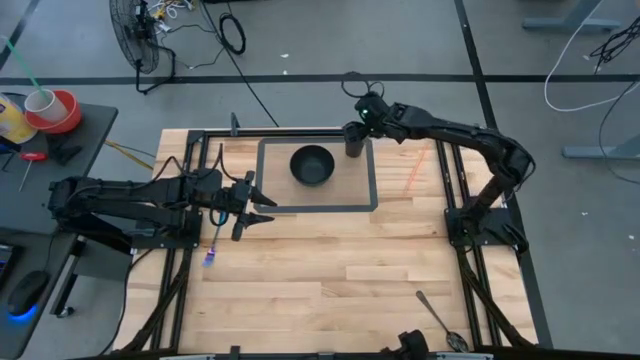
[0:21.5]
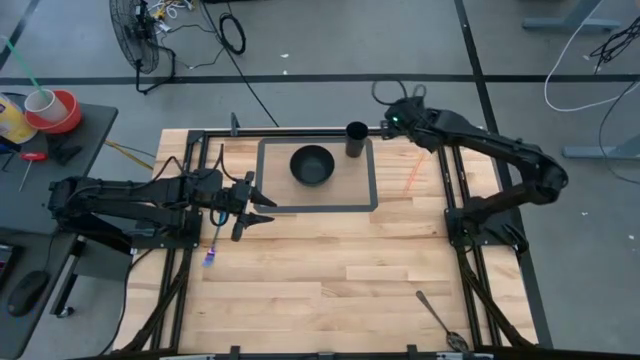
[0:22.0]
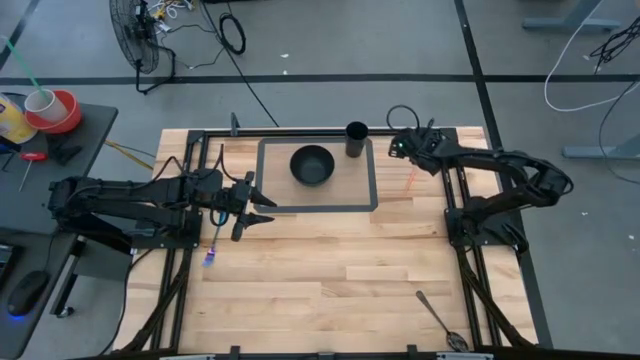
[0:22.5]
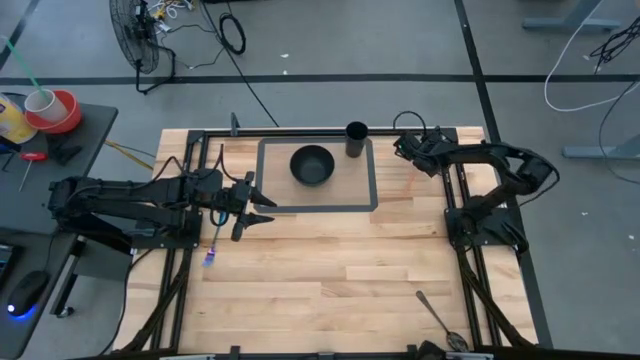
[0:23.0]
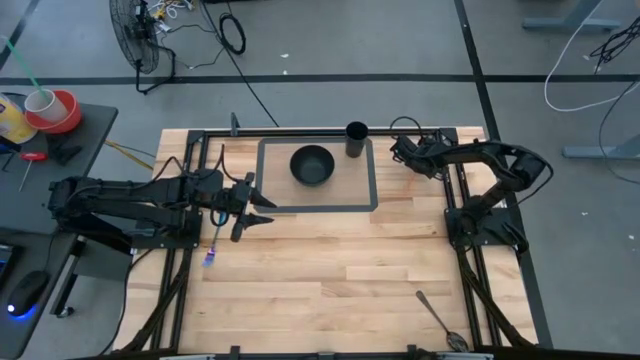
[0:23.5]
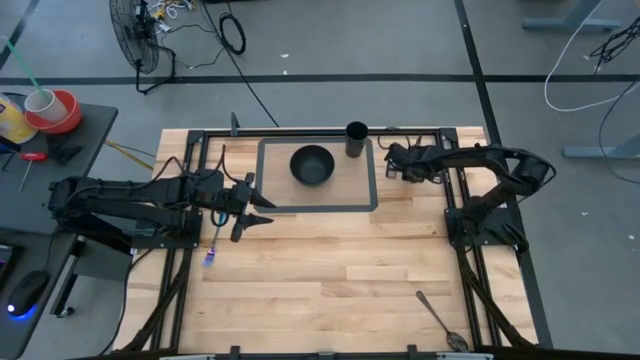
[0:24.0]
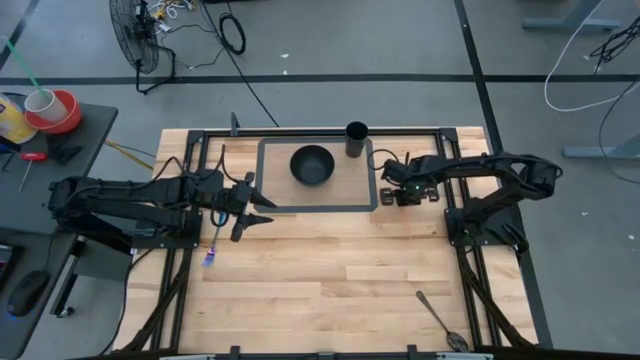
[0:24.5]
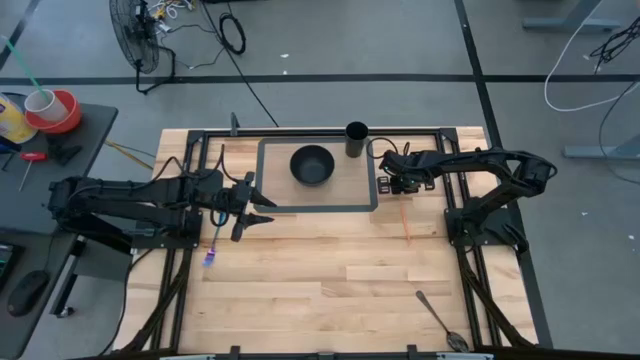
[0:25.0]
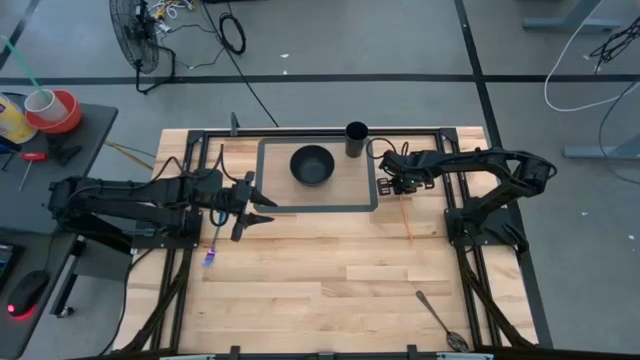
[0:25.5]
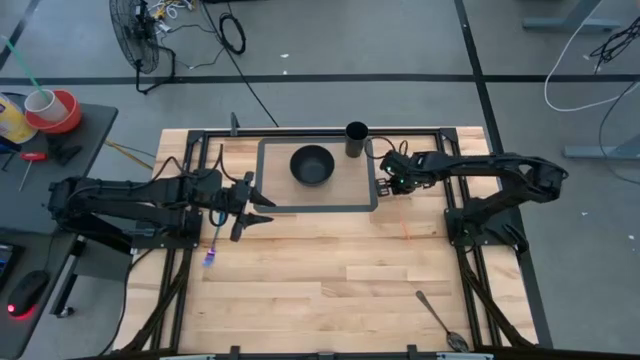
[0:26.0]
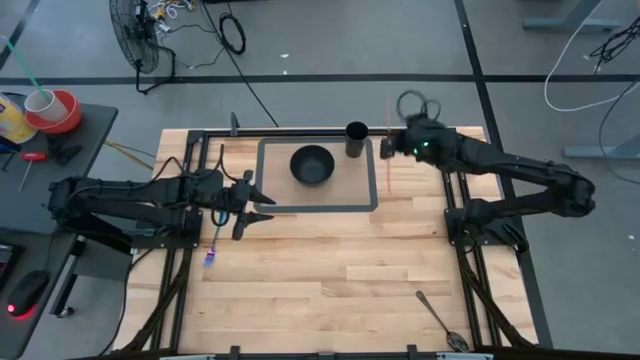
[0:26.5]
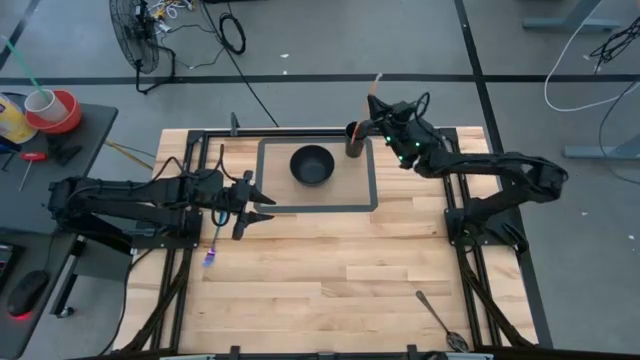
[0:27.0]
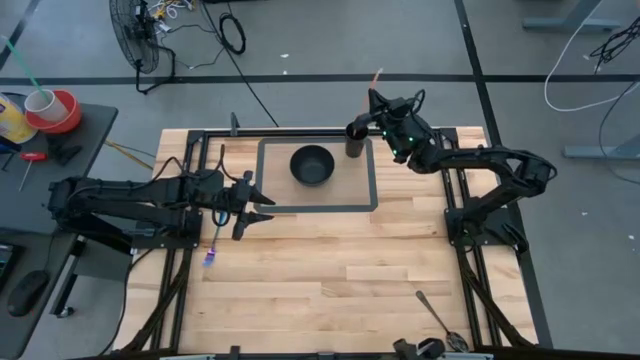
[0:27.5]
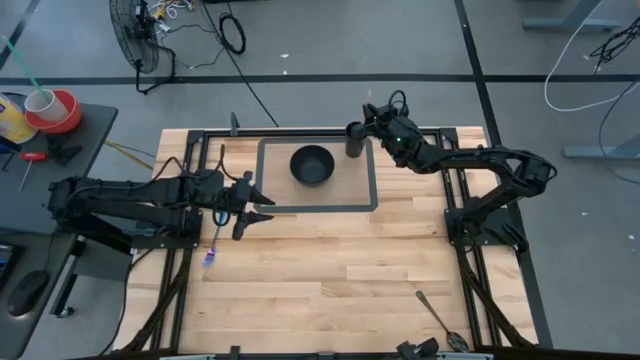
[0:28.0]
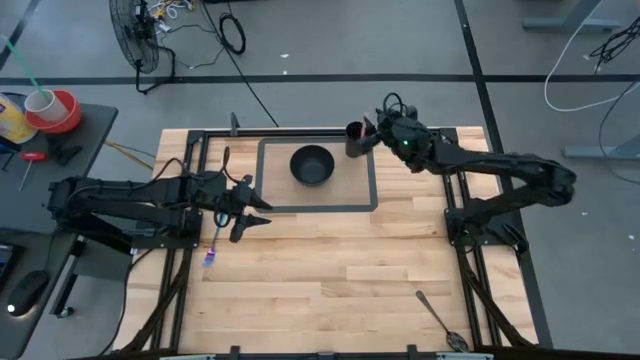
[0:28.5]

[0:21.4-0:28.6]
Task: Pick & Place Utensil
Put the orange straw into the black cup

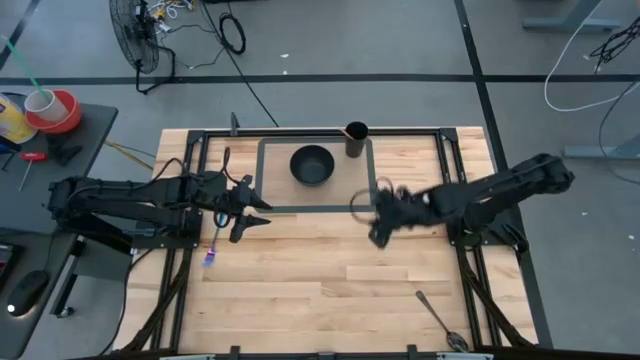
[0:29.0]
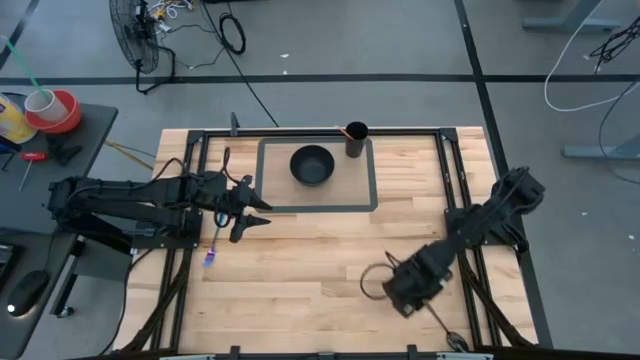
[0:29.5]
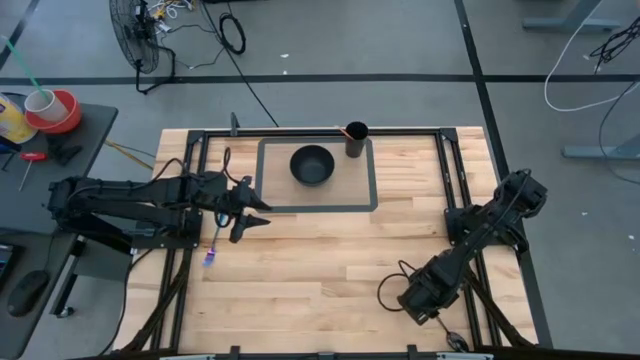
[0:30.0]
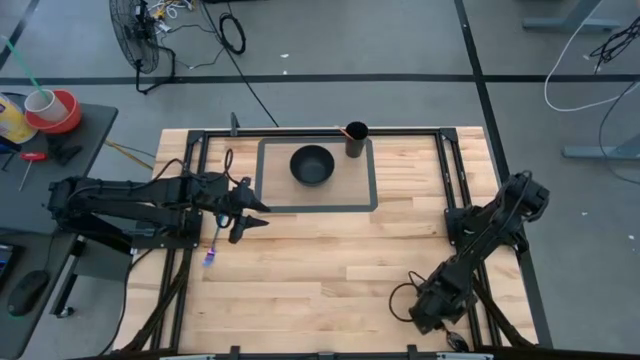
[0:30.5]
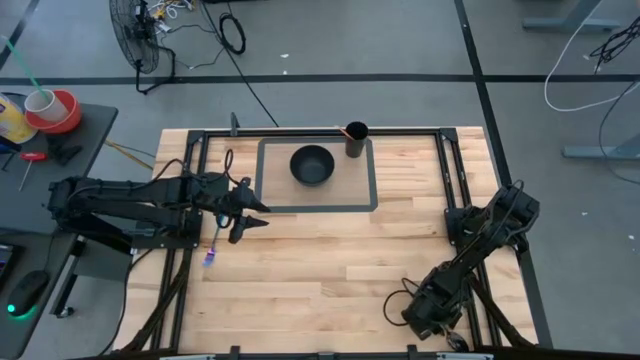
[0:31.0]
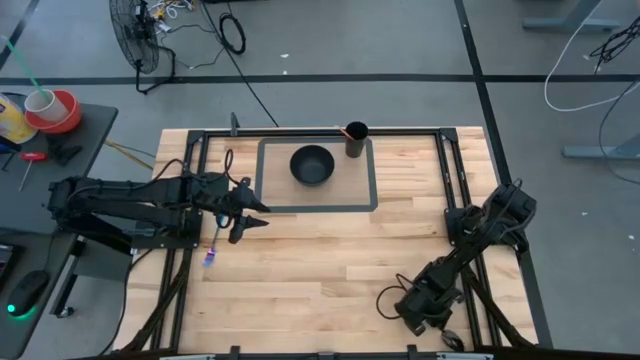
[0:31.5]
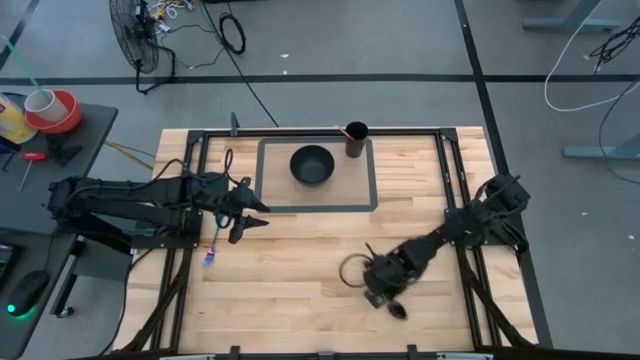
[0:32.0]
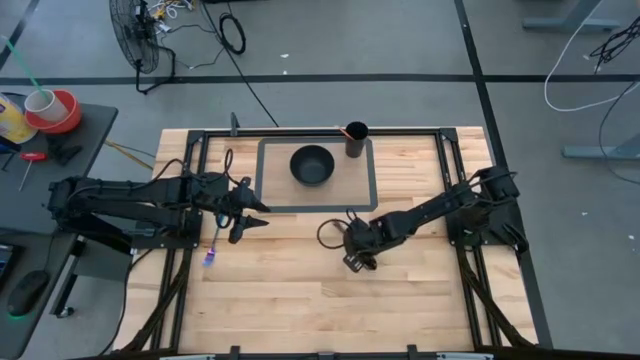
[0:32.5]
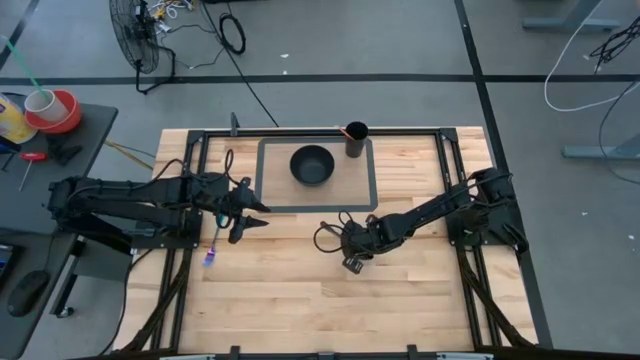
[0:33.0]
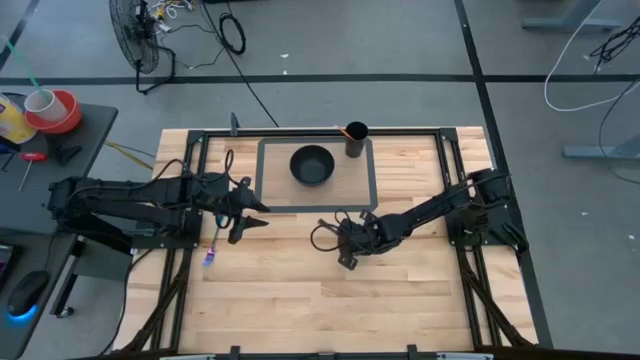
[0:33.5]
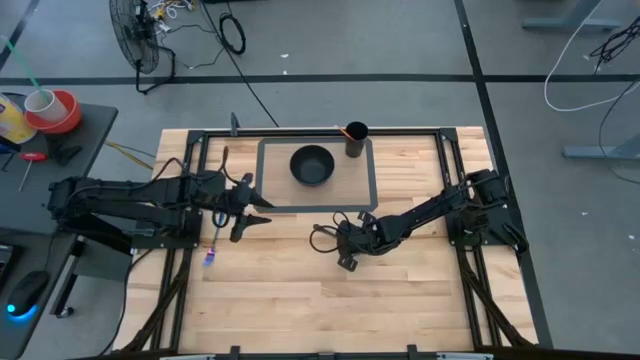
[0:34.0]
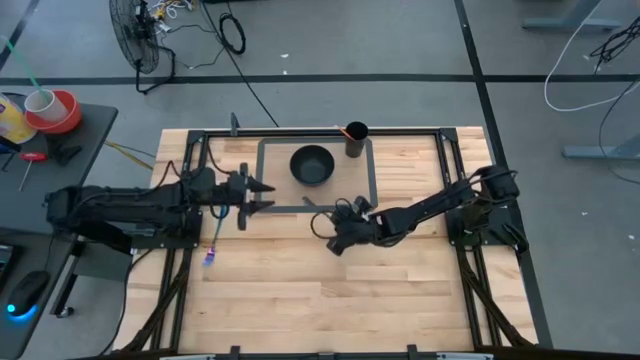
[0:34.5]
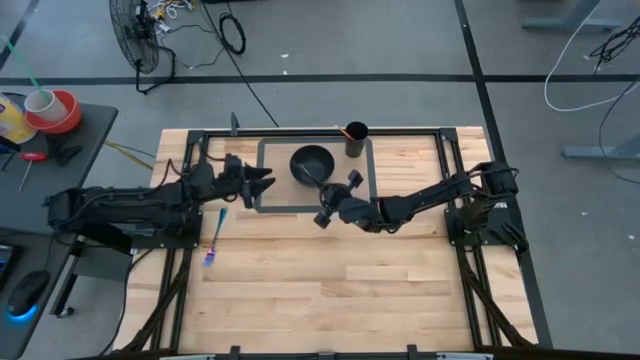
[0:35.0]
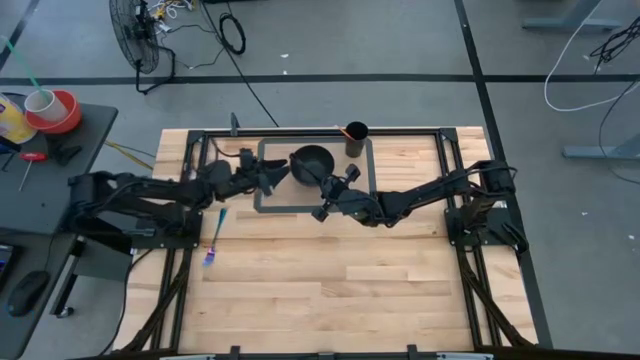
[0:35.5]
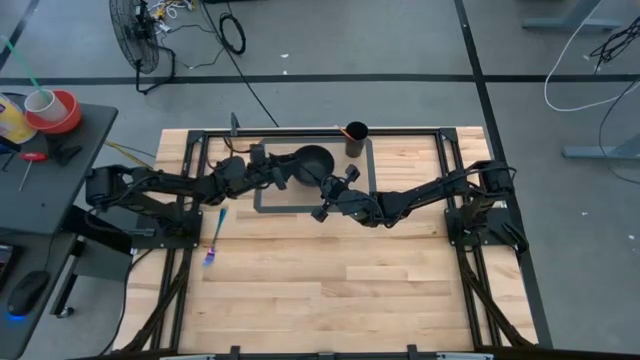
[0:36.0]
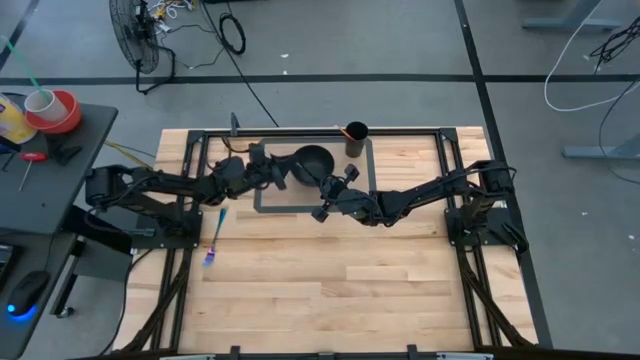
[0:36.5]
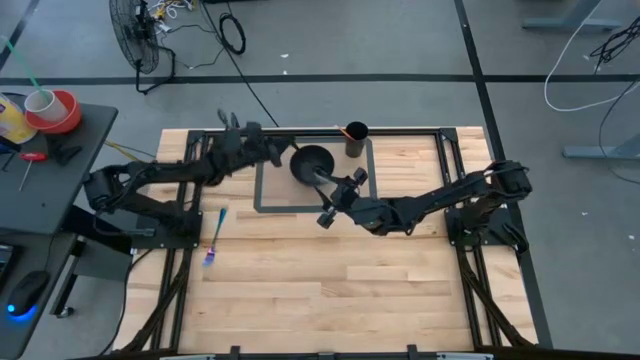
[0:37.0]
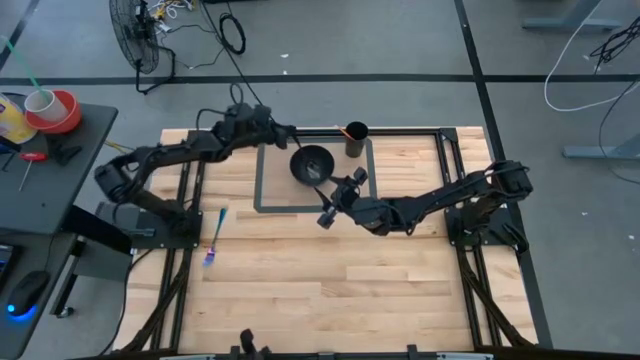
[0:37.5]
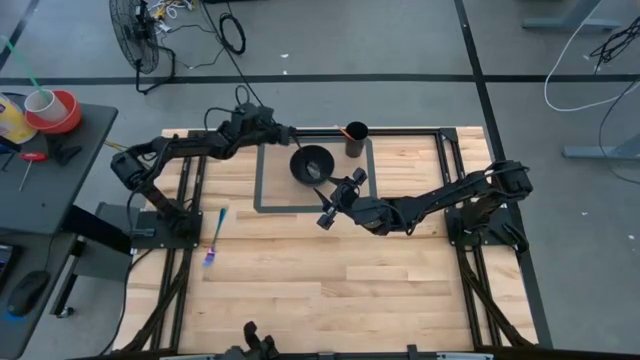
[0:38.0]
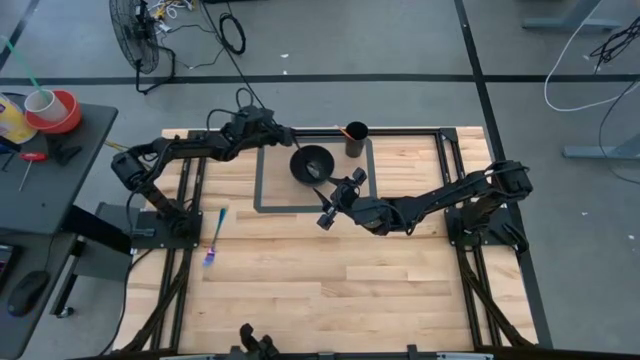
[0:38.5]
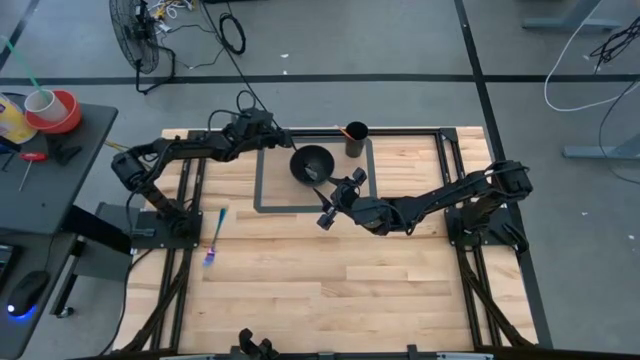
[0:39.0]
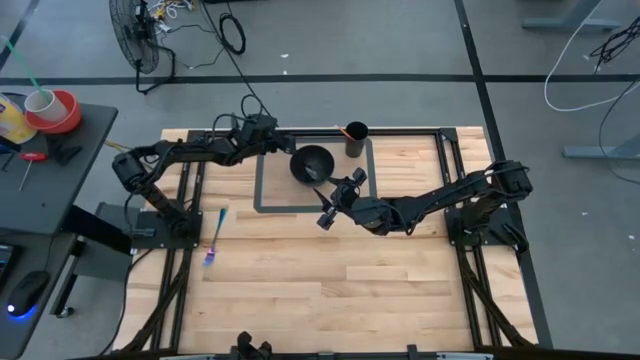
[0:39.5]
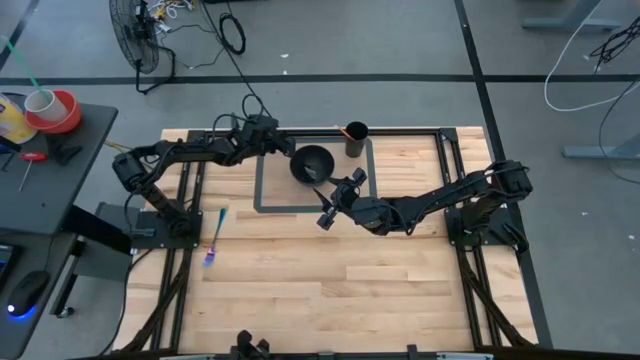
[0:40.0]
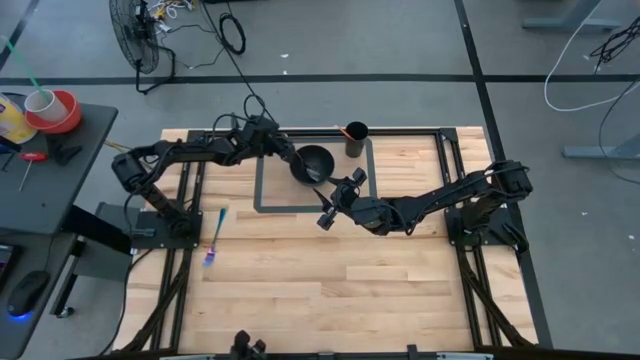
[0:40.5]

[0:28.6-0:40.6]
Put the black spoon into the black bowl
